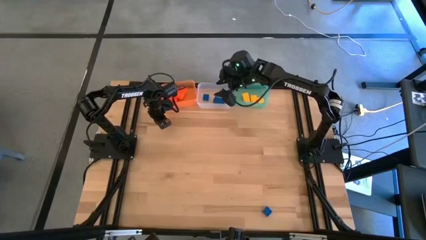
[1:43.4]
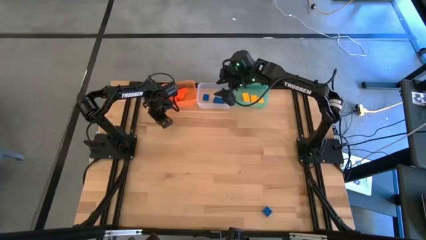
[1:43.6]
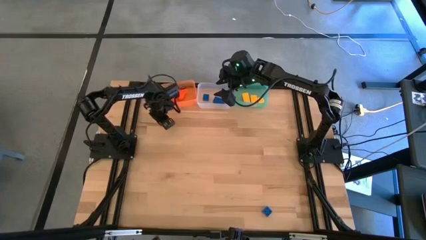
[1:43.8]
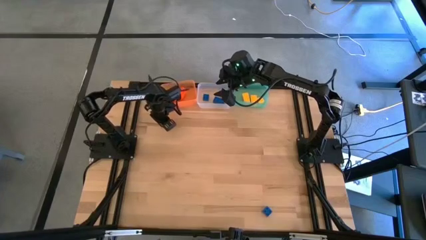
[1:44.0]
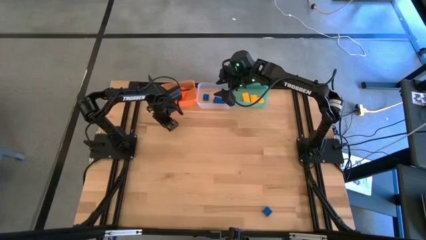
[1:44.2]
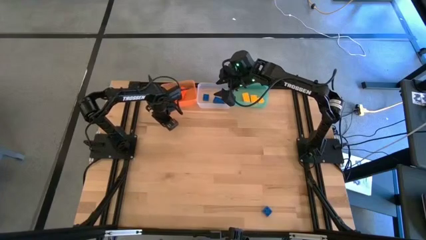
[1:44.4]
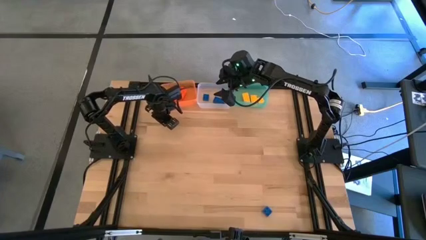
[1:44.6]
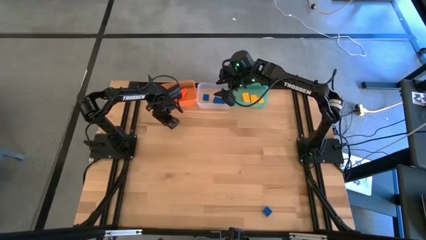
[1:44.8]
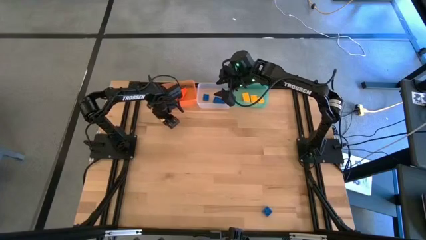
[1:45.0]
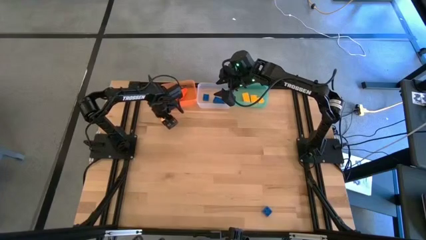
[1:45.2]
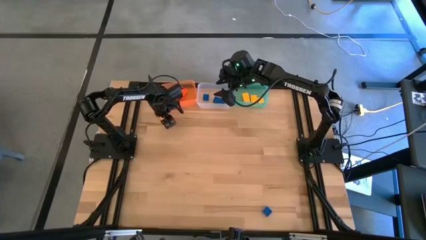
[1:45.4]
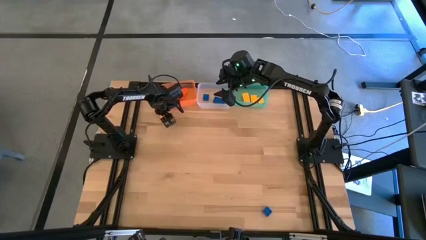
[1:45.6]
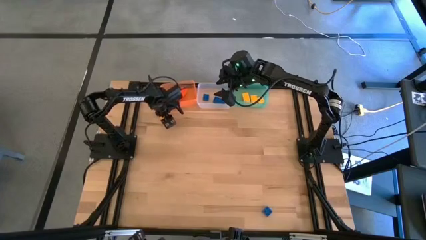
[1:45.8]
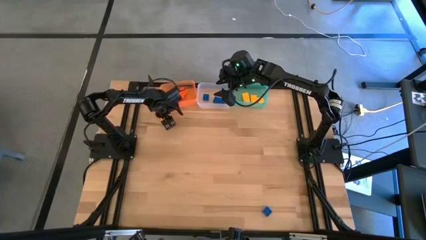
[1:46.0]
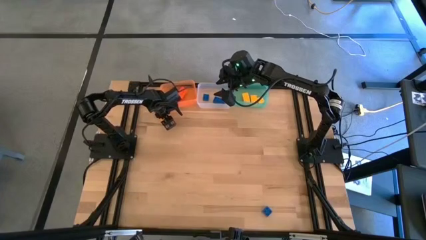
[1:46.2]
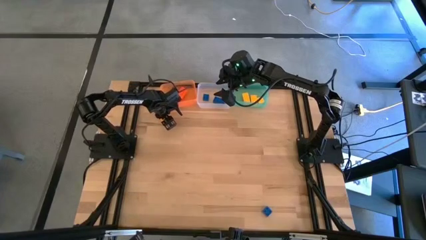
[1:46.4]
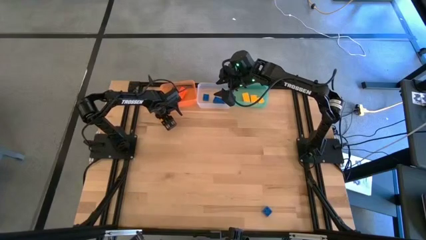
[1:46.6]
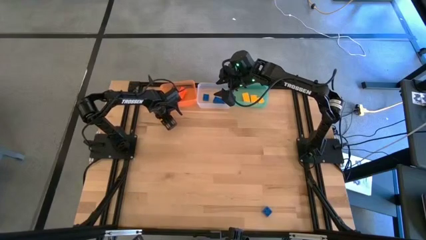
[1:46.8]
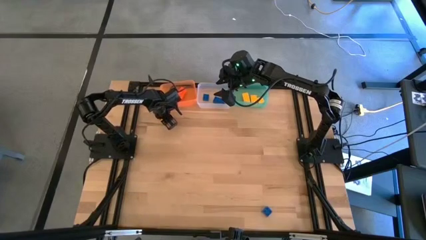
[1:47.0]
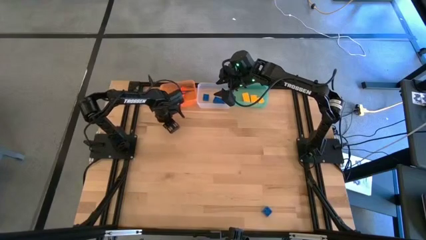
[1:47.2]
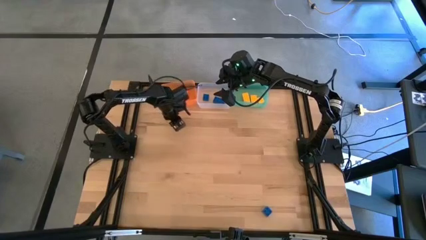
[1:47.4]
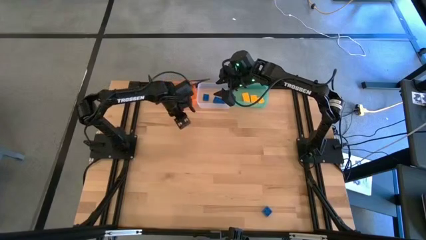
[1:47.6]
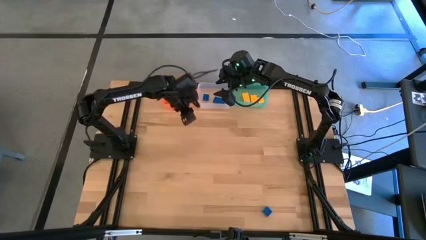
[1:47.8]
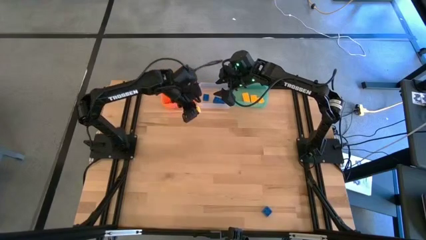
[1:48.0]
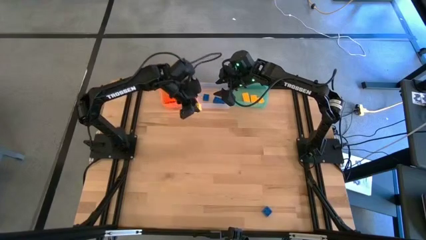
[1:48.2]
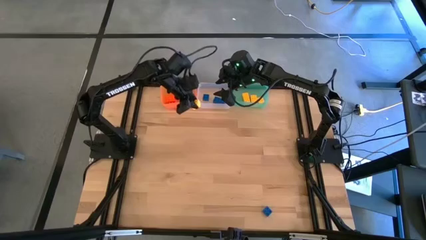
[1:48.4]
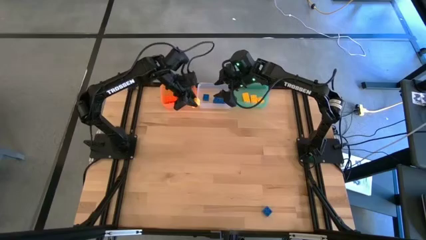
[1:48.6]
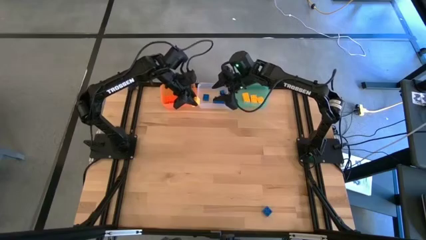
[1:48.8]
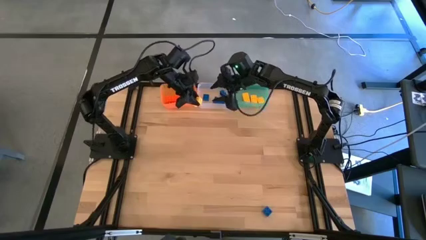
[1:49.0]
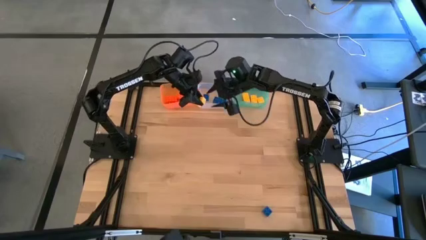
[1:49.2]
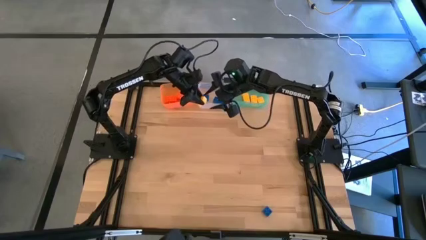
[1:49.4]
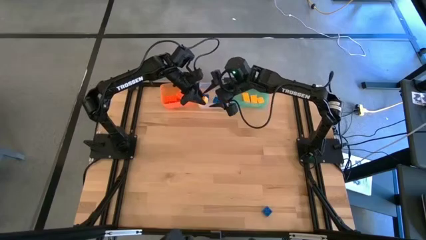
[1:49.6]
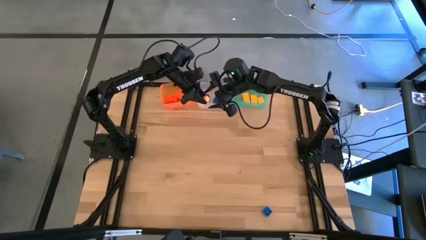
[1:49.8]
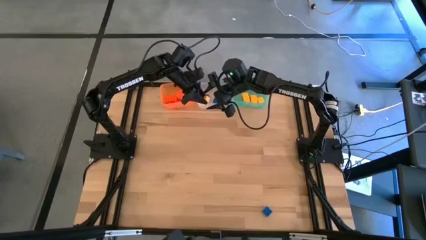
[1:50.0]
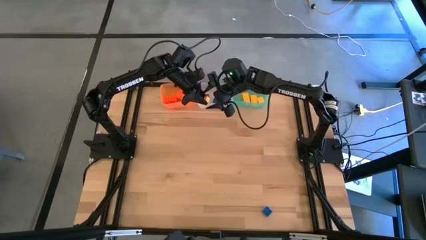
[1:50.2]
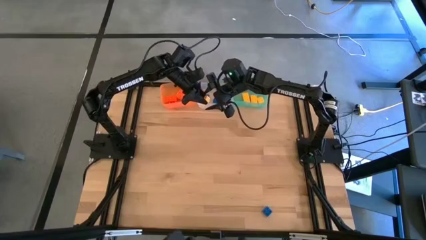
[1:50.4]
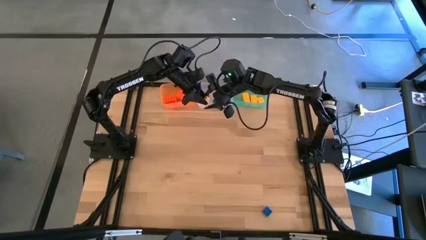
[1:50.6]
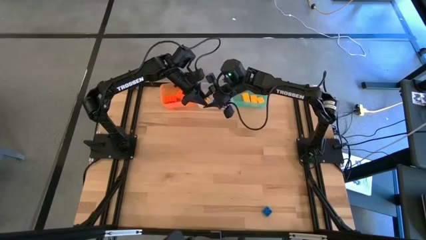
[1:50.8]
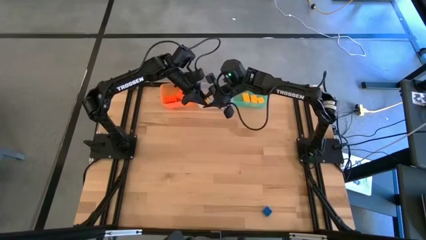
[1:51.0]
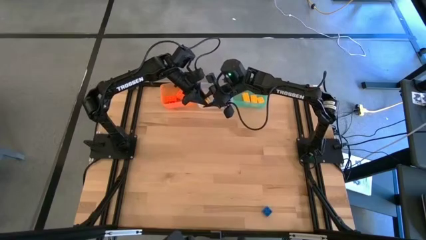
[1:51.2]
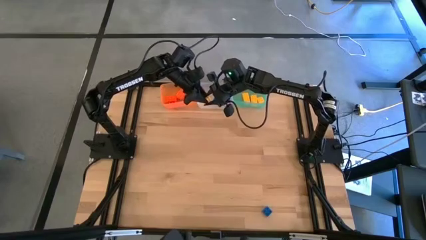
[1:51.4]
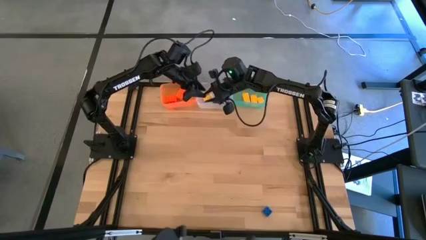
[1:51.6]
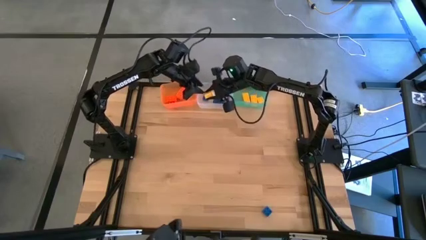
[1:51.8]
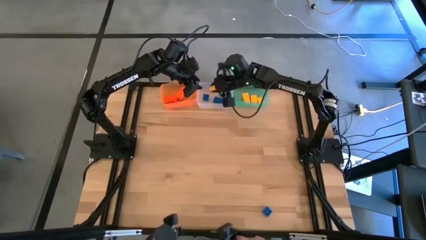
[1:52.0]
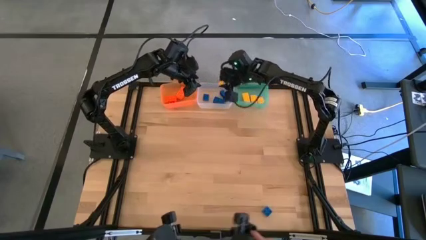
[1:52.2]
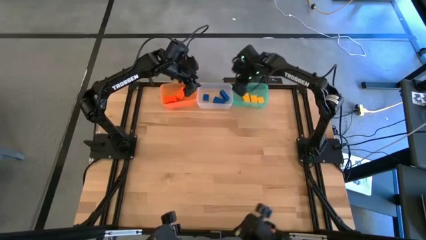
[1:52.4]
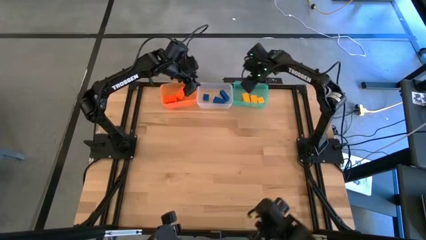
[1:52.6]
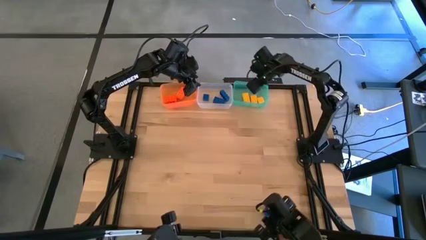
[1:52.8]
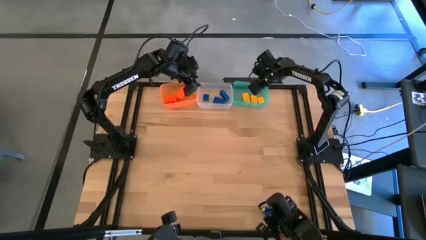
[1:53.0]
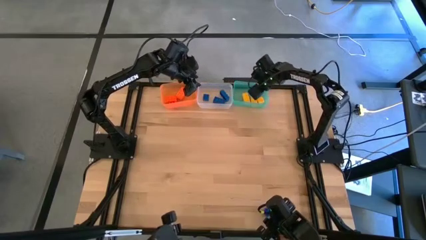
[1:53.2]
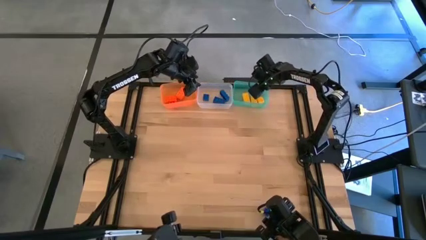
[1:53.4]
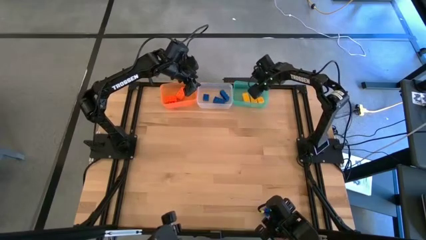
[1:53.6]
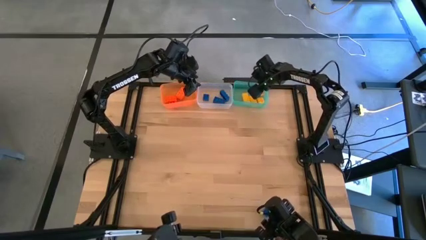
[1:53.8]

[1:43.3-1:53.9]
Task: Sort & place blocks by color
Put the yellow game piece into the green bin

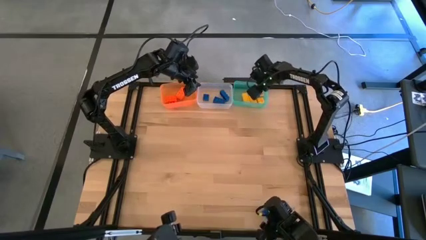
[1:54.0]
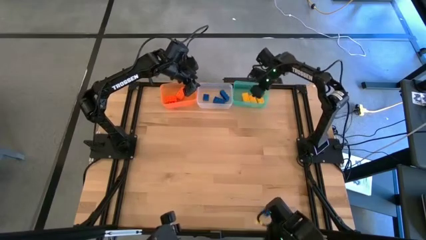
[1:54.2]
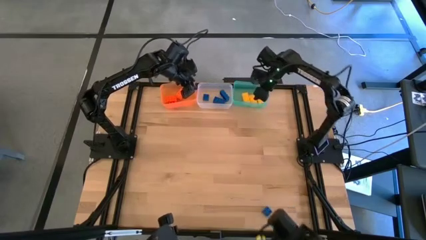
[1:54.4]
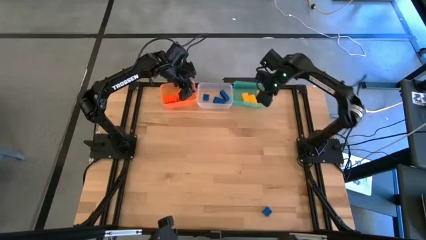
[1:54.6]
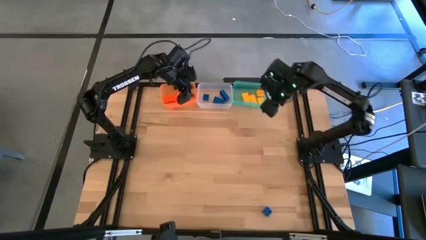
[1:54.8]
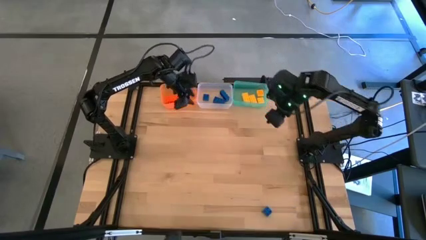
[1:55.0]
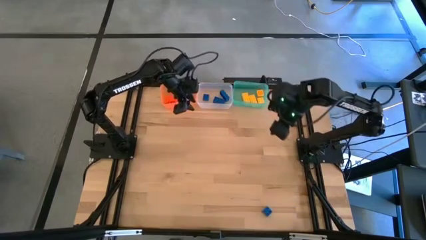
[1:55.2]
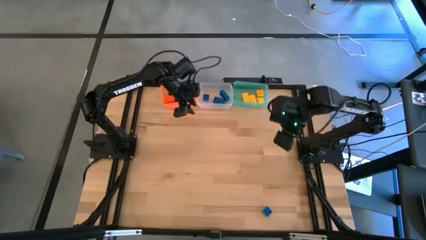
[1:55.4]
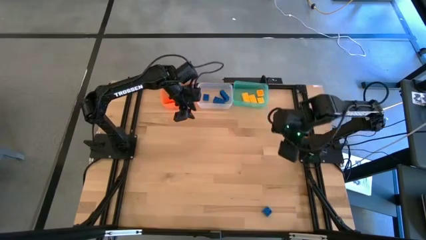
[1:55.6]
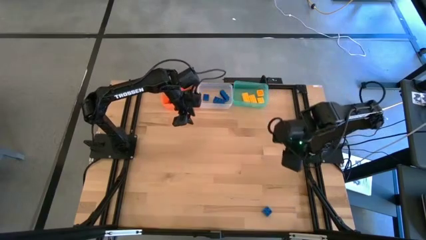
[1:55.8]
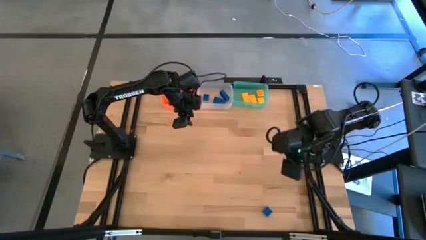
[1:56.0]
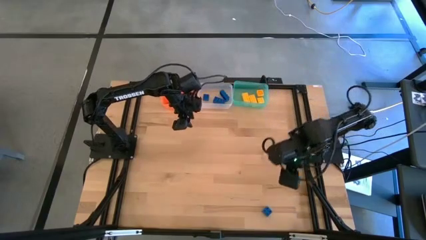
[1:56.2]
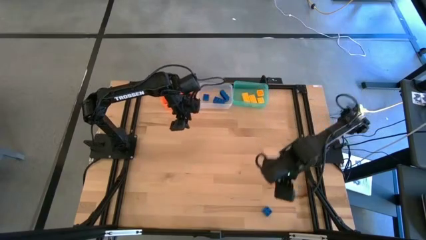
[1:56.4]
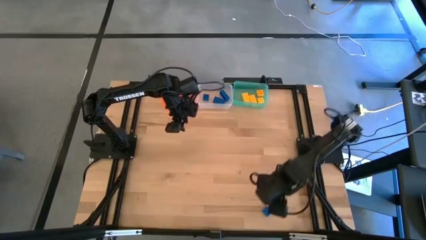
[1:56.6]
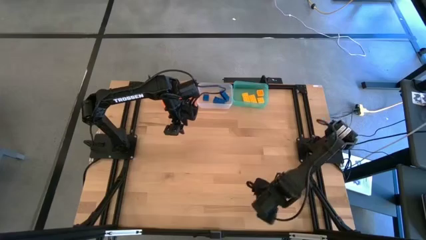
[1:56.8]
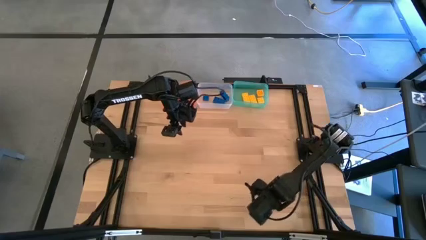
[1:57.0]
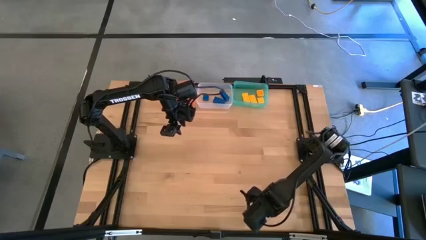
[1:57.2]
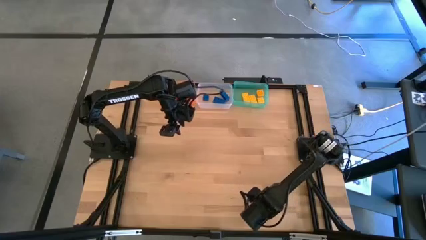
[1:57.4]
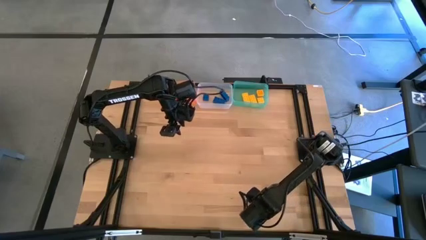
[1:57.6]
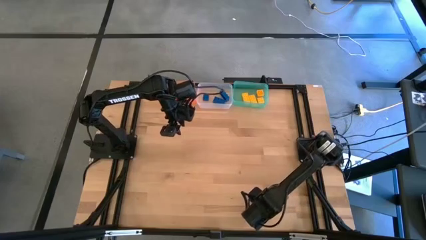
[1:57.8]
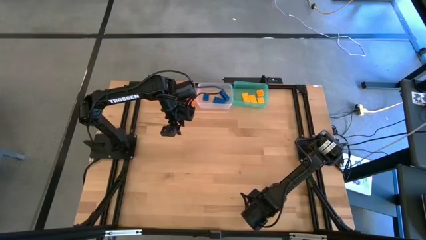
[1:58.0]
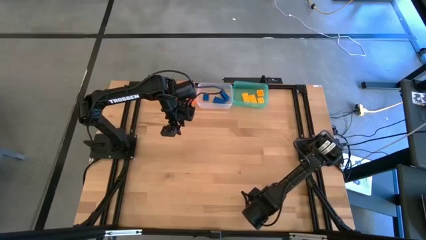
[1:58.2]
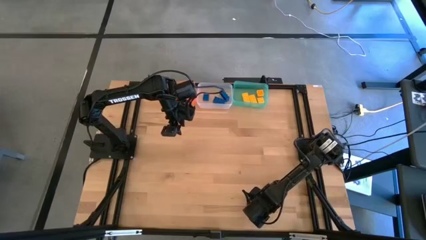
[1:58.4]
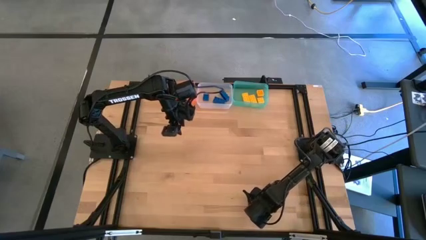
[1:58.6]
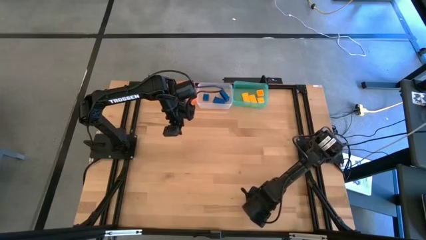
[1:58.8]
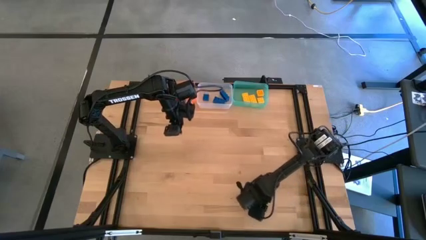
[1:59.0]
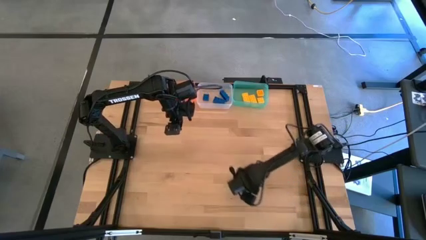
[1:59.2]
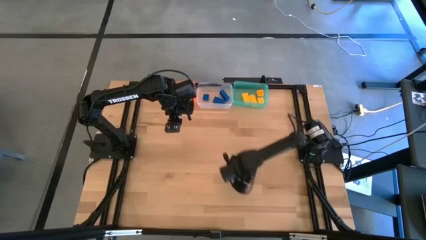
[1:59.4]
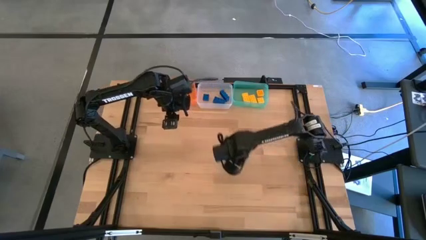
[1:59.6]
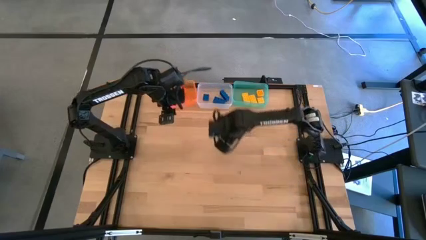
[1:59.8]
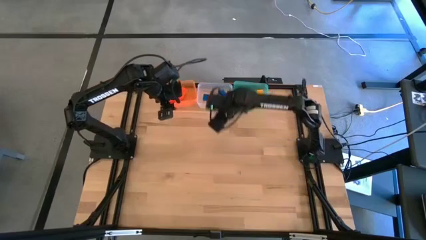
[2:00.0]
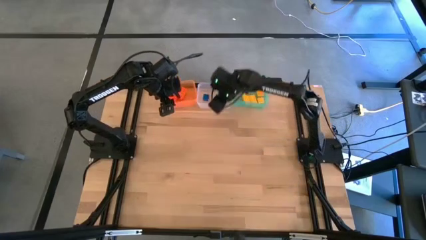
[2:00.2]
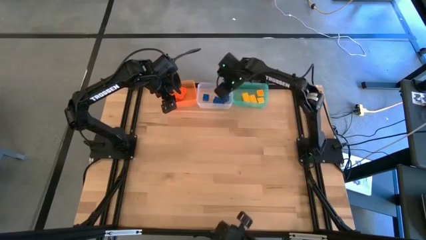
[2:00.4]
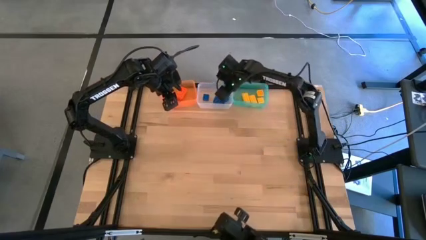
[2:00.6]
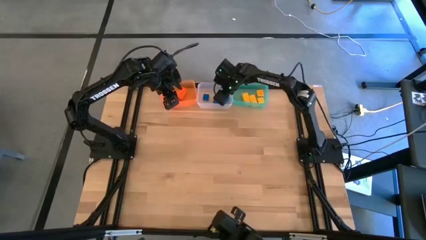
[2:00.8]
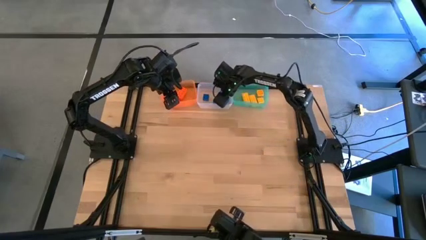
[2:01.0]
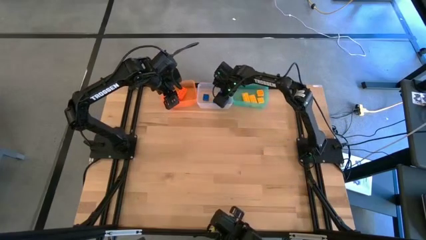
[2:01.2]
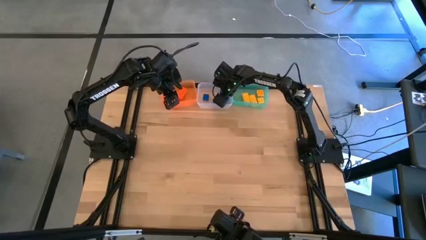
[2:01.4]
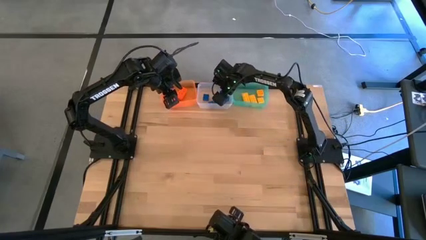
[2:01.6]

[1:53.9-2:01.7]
Put the blue game piece into the transparent bin
